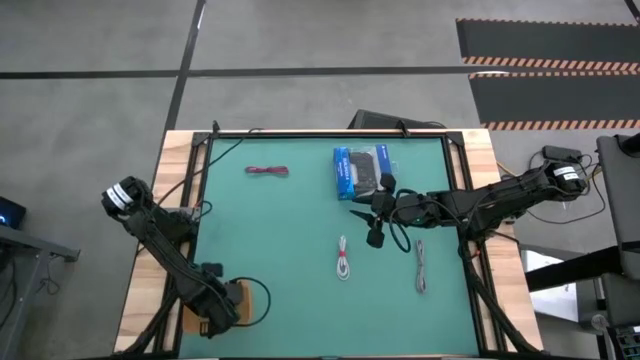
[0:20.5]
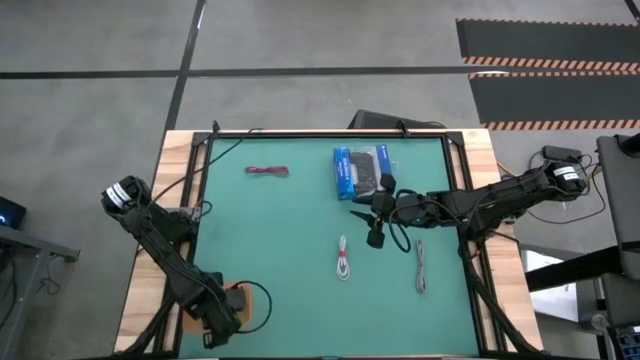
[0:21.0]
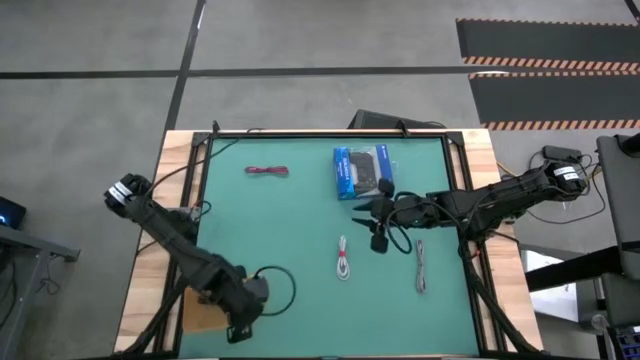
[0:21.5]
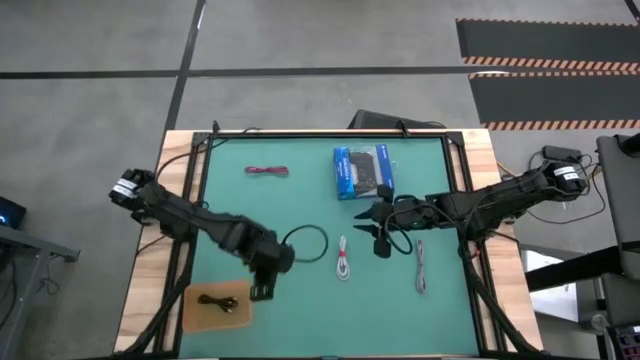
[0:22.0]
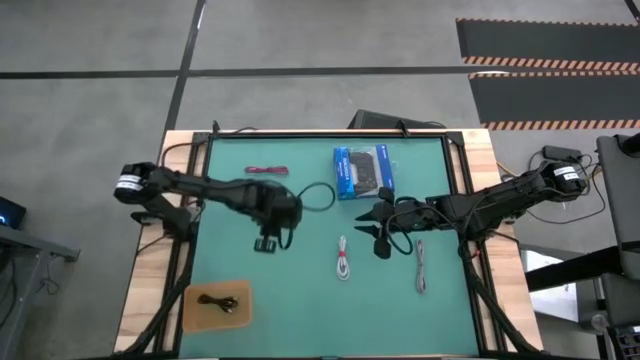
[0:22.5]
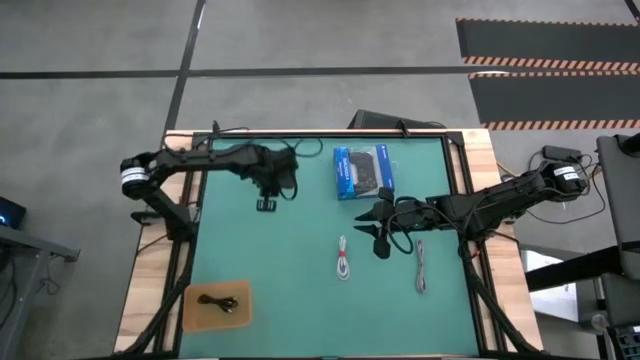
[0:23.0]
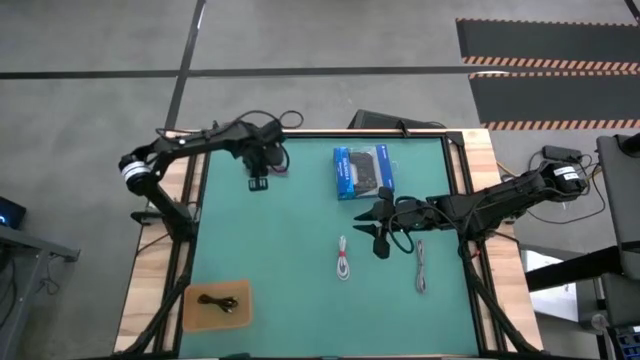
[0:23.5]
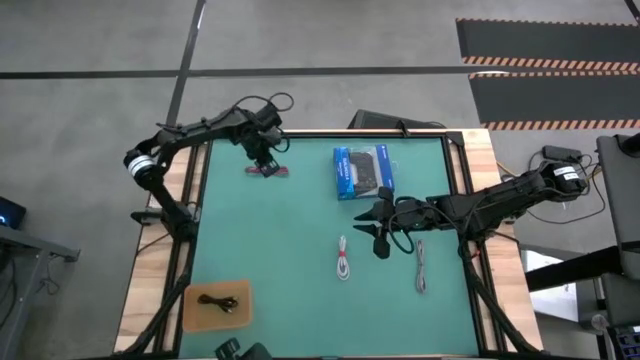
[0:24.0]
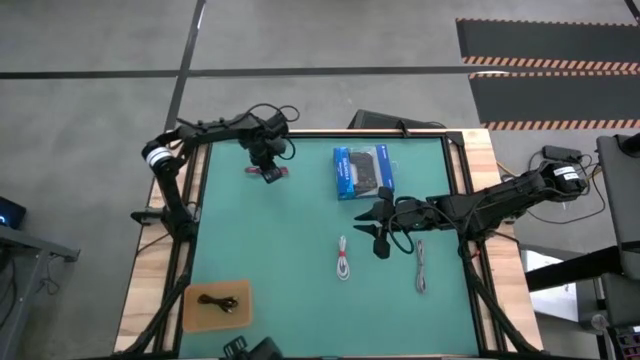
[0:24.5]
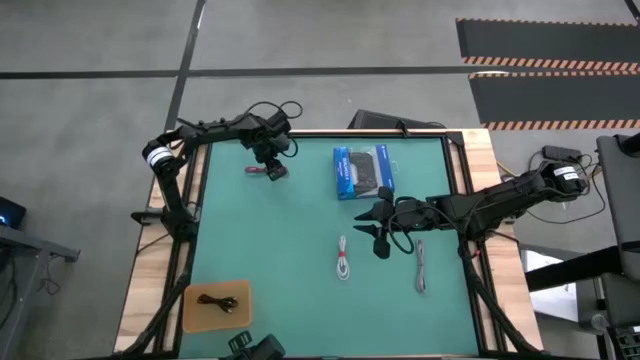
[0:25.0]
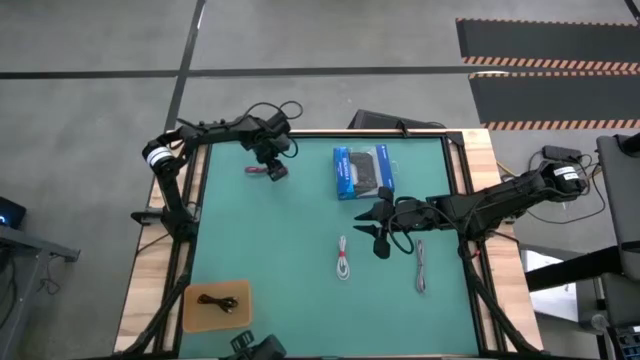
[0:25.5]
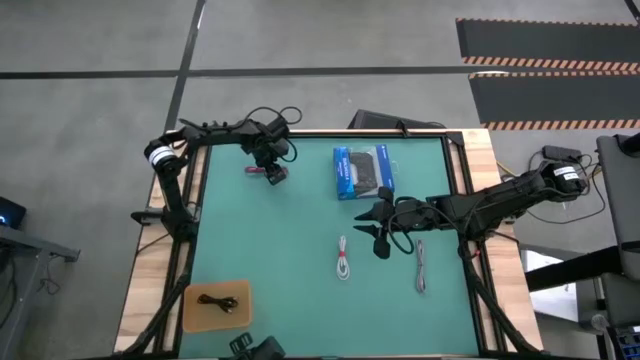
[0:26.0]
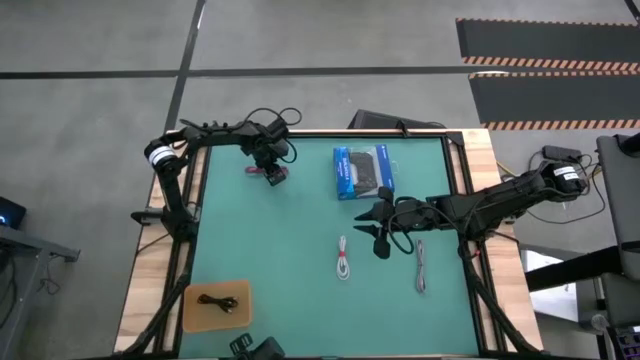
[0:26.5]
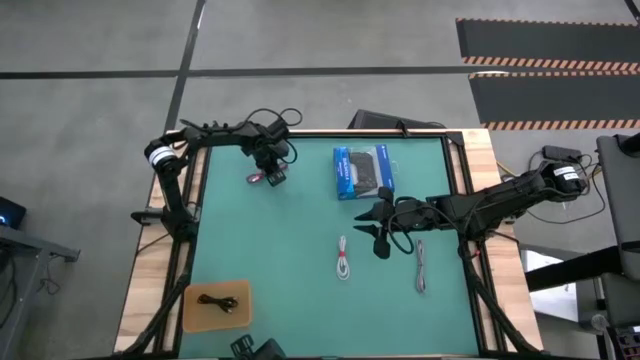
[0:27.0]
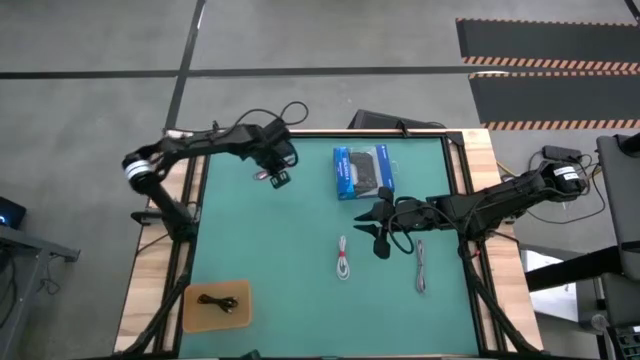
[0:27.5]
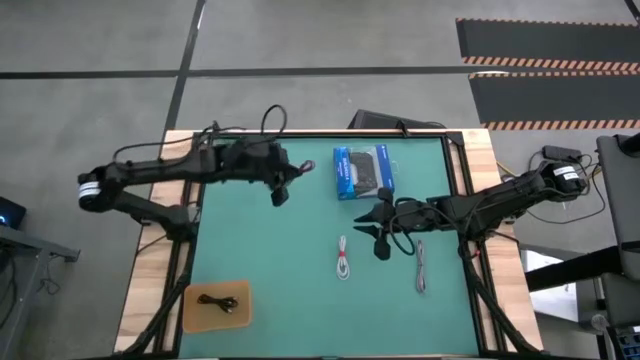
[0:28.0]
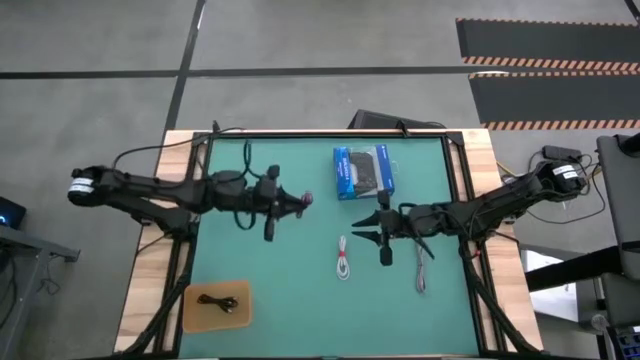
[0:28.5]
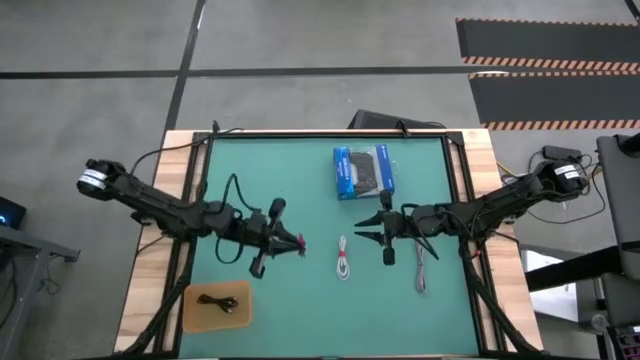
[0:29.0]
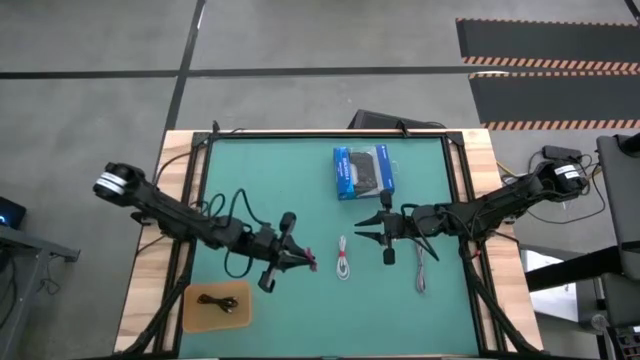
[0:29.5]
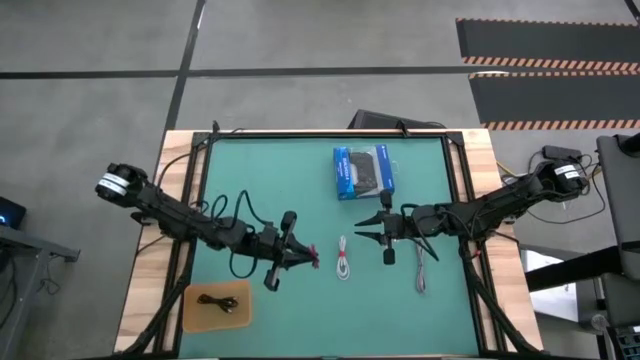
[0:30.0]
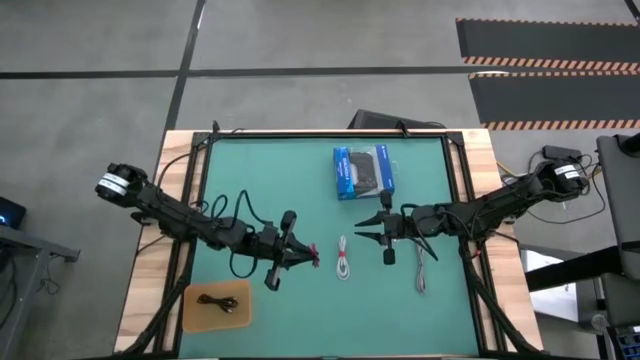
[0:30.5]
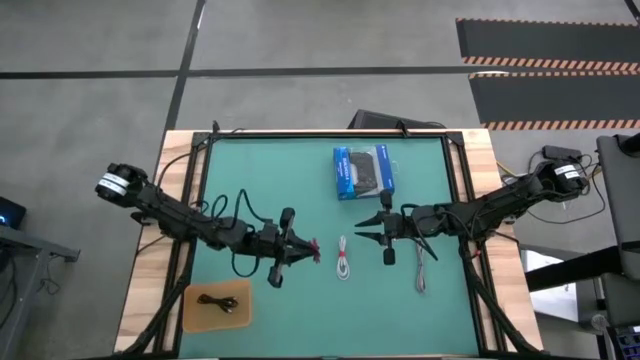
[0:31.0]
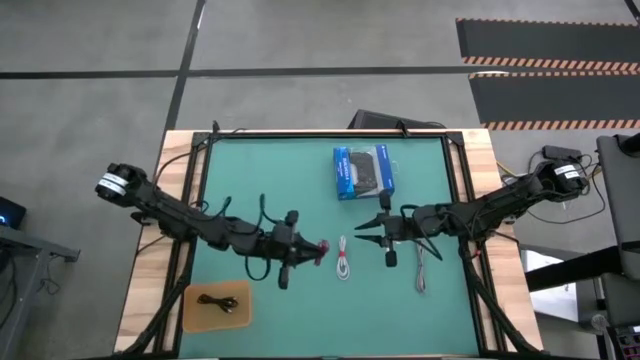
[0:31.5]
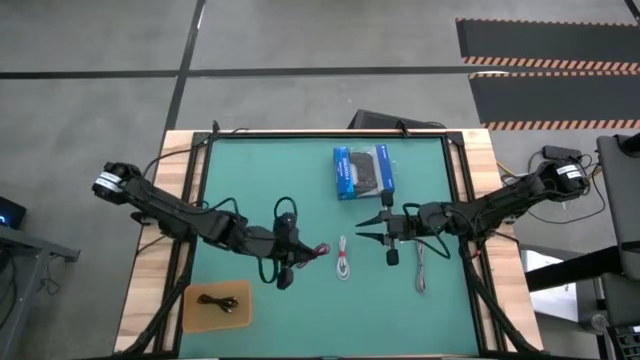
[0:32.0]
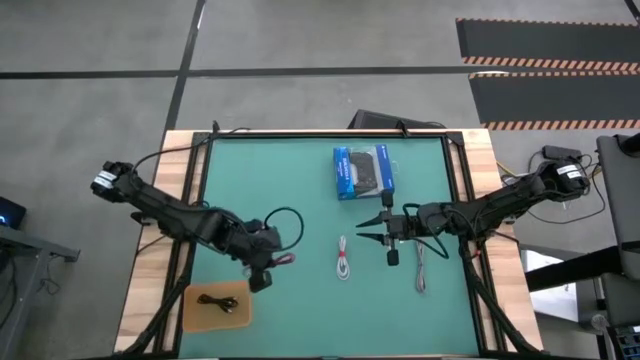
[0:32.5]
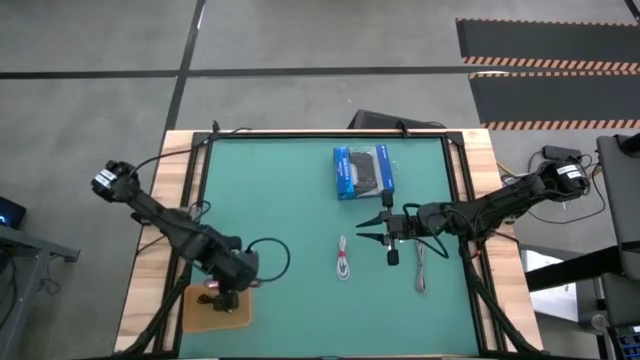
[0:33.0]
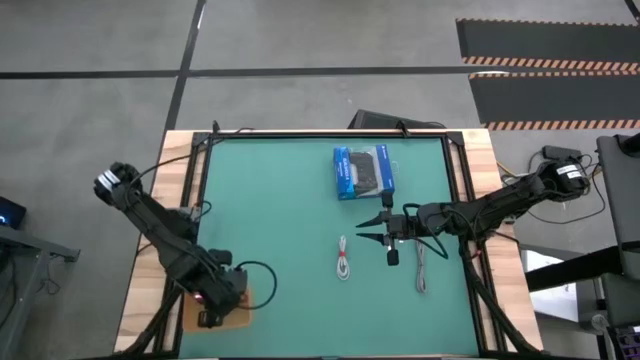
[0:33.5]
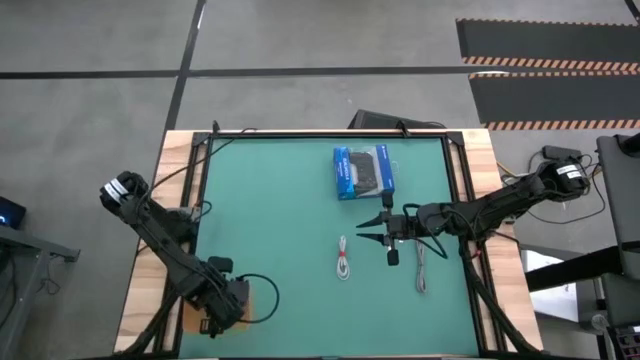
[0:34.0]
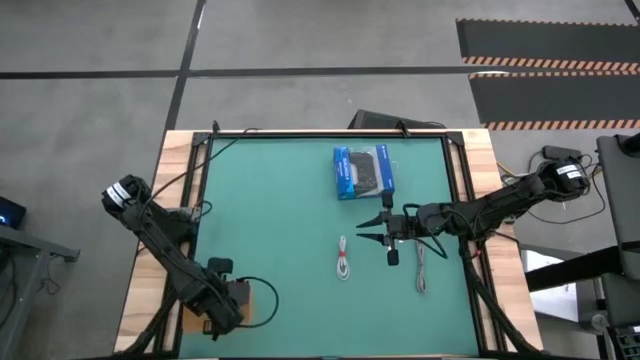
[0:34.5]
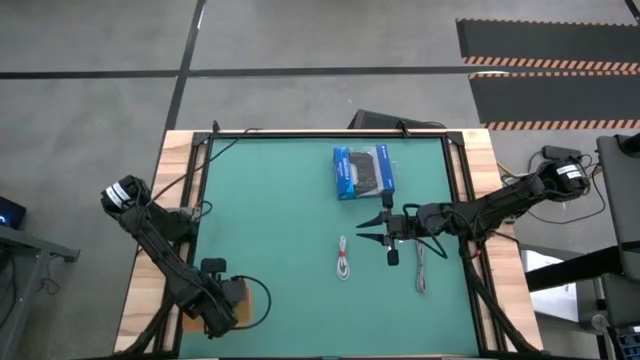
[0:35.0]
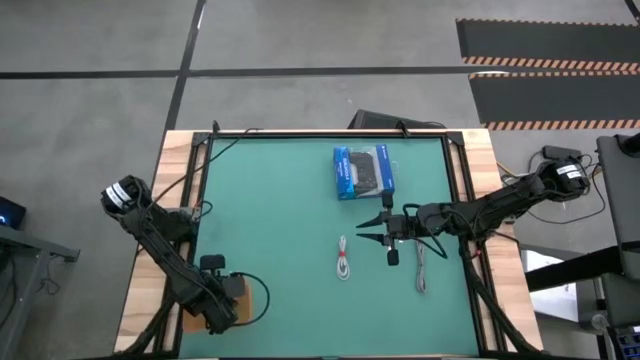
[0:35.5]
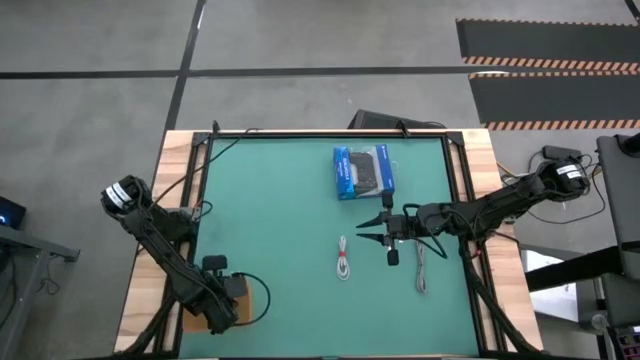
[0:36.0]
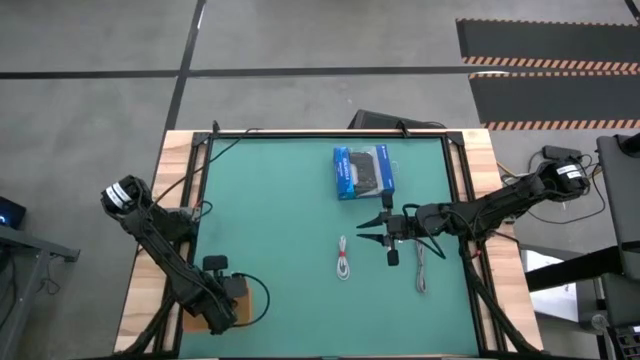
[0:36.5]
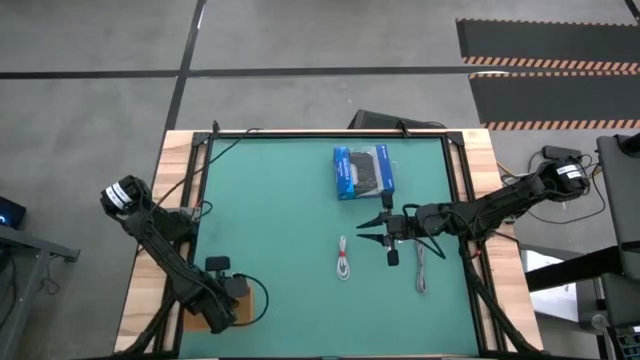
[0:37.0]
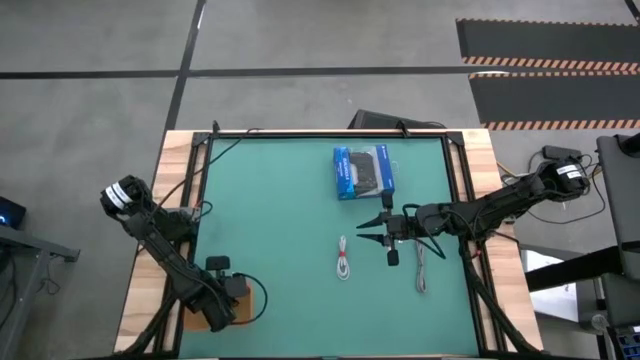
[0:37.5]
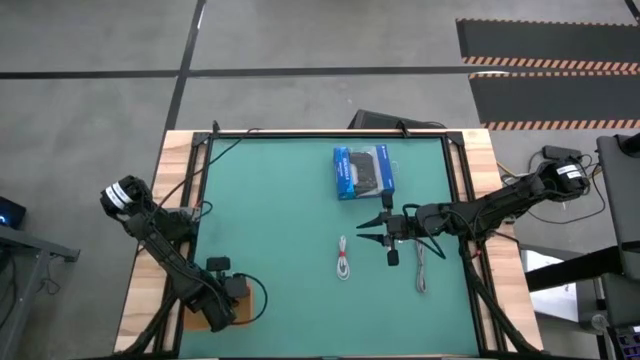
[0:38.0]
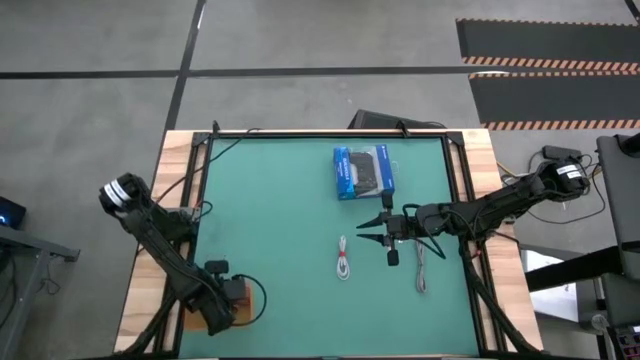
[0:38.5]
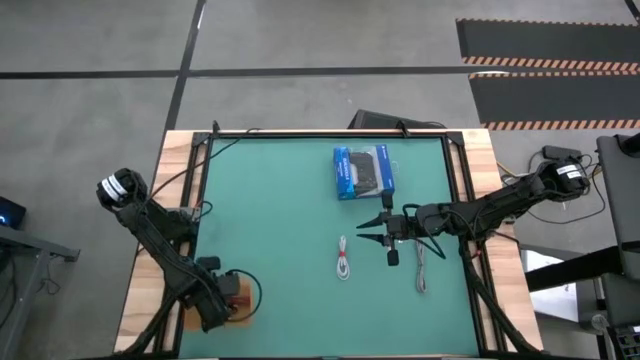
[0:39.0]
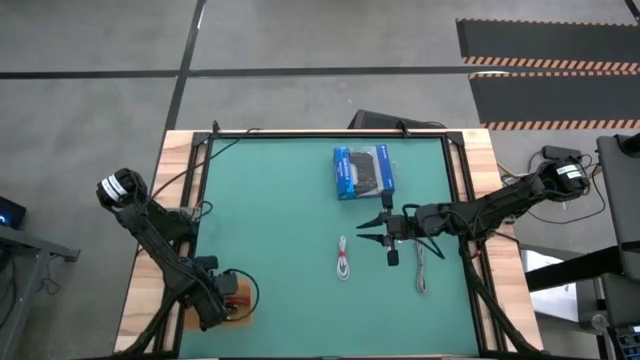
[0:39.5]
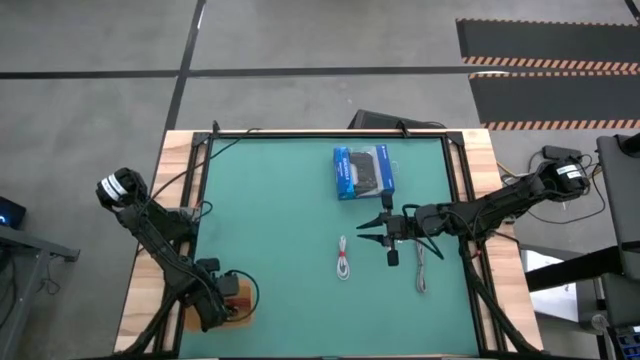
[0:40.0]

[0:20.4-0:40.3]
Task: Pick and place USB-C Cables
Put the pink charger cable into the orange bin
